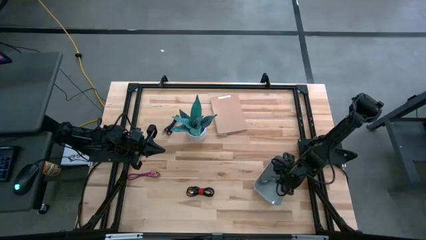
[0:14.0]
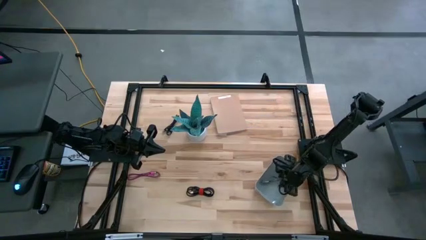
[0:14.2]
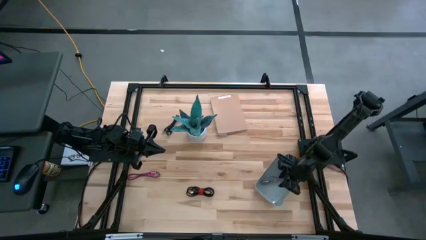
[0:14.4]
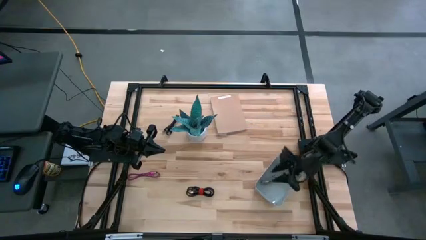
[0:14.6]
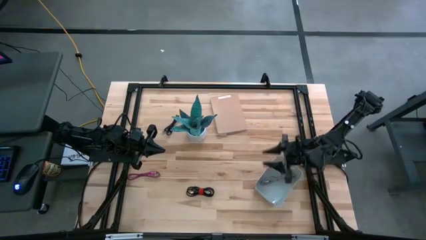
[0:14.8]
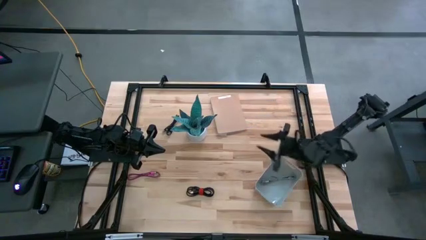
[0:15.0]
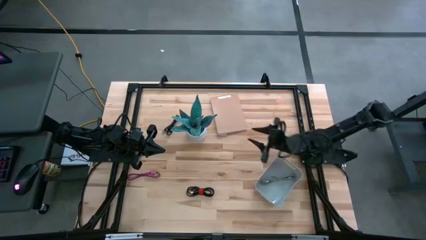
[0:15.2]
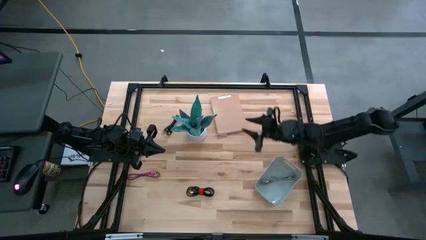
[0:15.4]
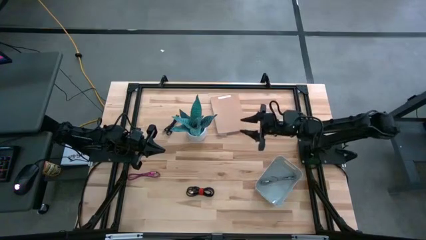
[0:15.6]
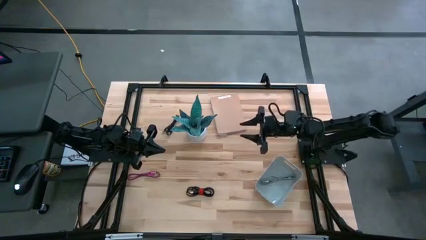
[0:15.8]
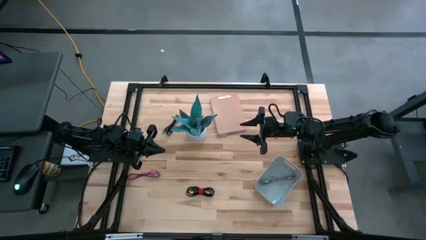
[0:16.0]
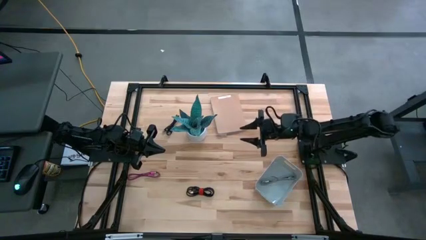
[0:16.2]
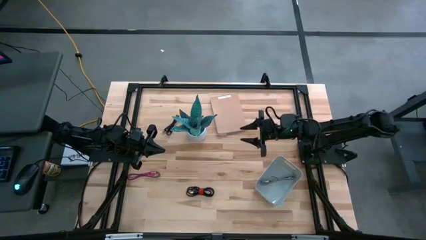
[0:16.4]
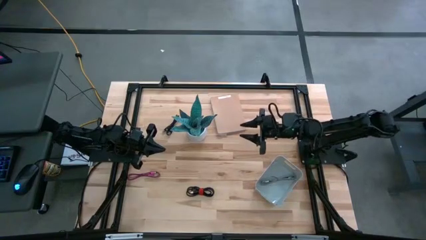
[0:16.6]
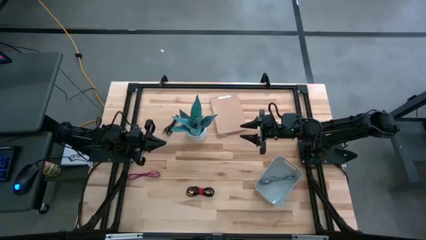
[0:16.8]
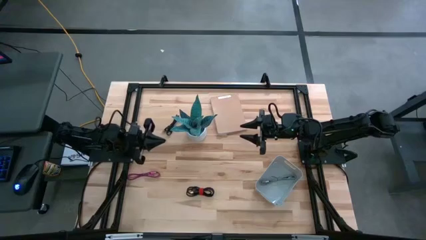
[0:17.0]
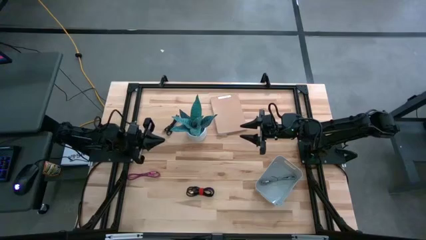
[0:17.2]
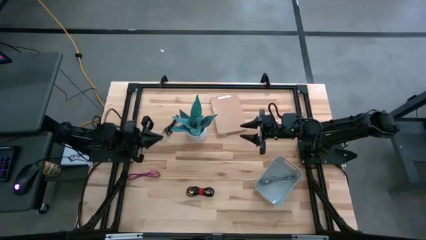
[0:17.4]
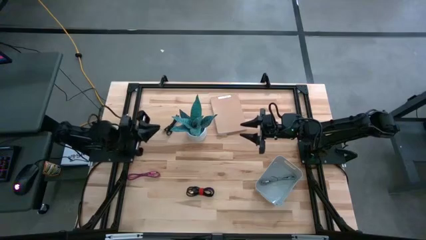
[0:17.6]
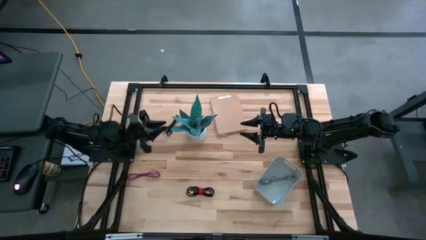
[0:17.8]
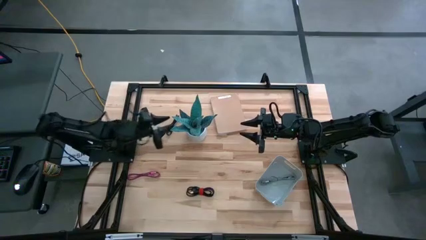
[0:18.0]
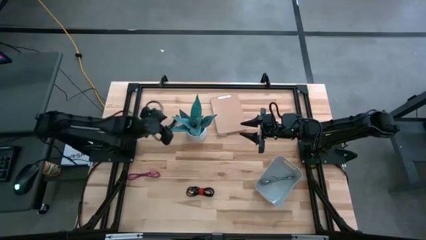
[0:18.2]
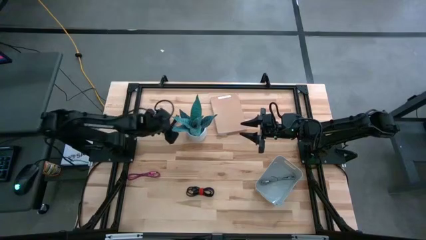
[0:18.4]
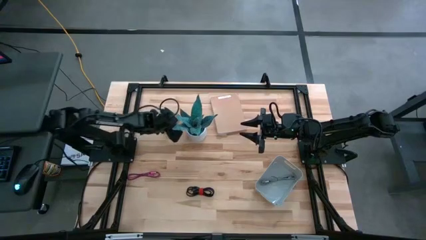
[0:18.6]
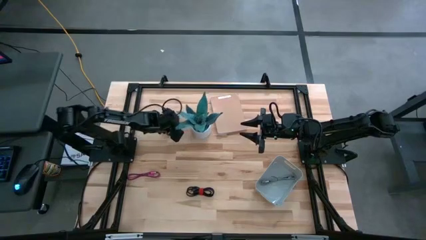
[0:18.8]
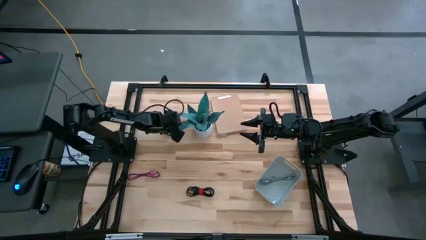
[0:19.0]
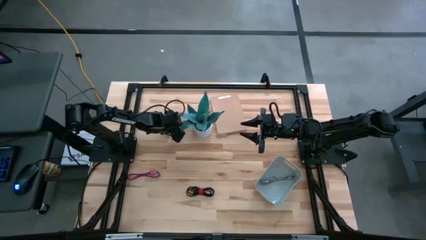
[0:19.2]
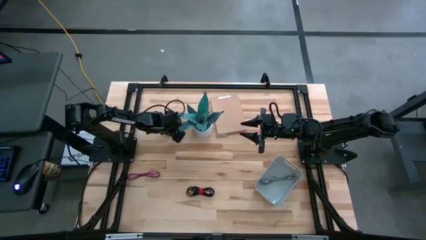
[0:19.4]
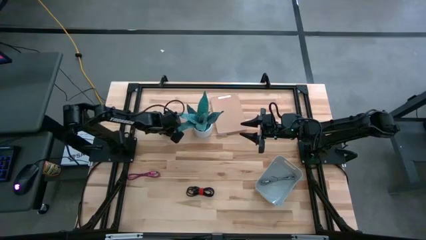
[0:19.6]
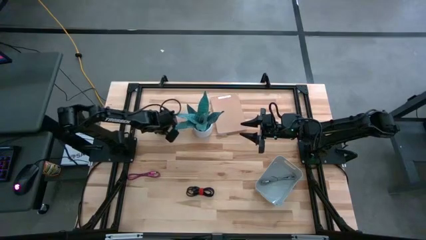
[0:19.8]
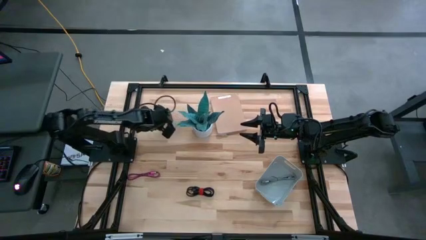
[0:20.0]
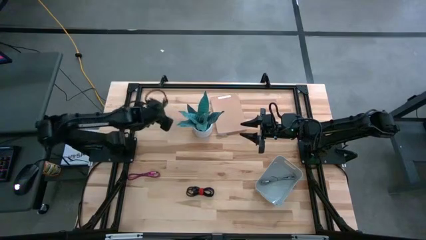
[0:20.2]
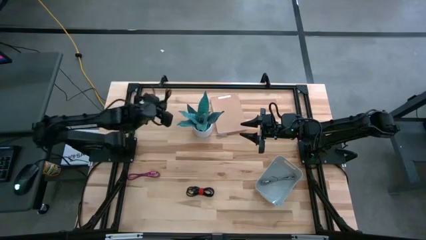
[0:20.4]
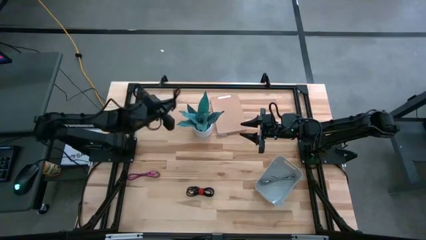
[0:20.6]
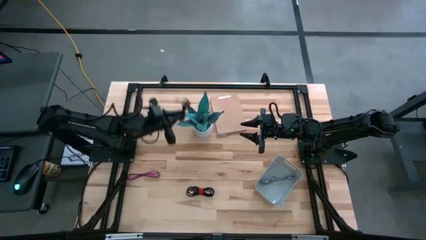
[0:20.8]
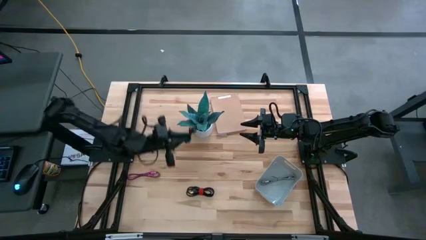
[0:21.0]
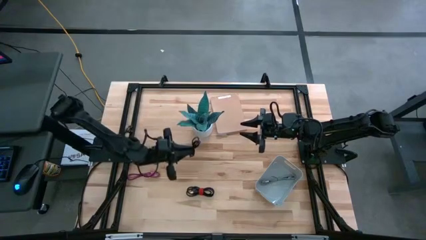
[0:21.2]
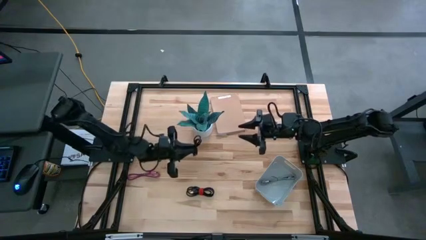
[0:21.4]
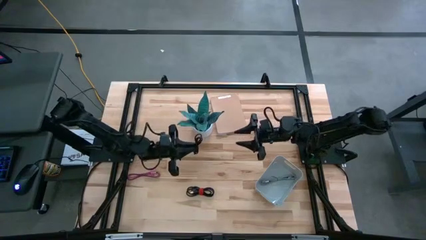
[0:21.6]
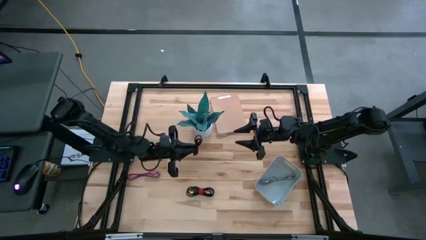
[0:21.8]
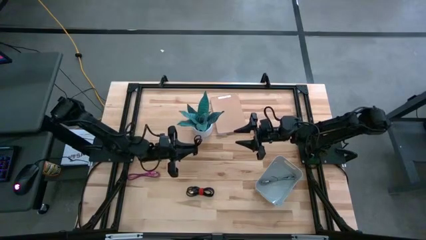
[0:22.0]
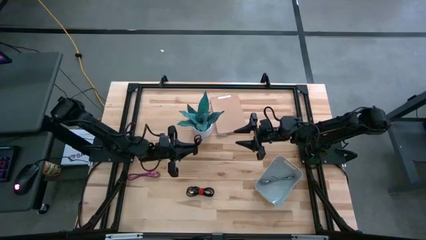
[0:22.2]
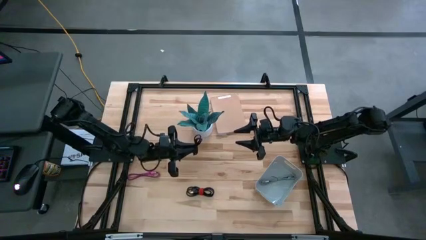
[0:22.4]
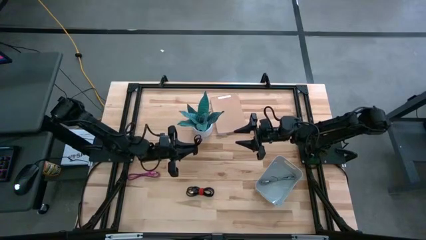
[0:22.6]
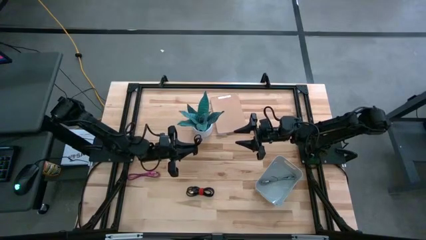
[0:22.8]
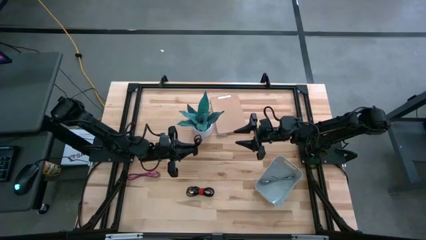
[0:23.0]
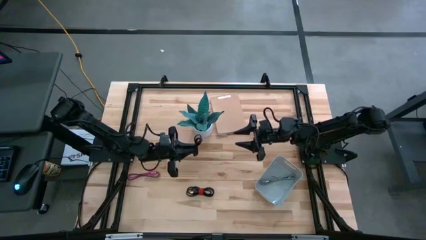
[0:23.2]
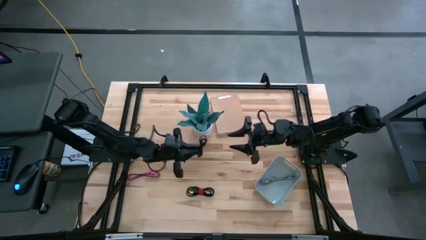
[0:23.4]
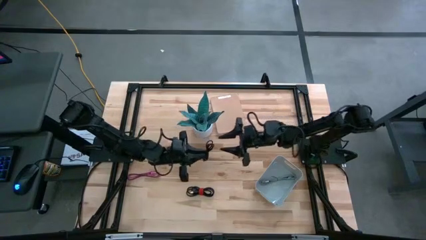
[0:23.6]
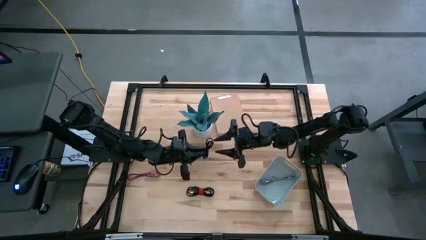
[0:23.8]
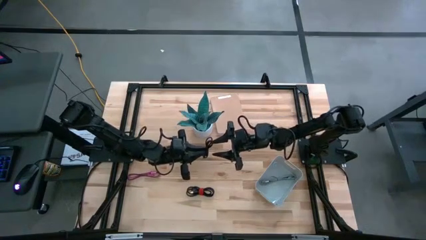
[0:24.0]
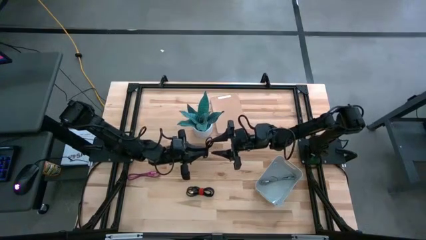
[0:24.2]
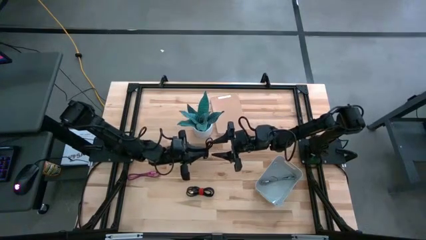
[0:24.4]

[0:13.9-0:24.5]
Task: Pick and place USB-C Cables
Put the top black charger cable into the white bin

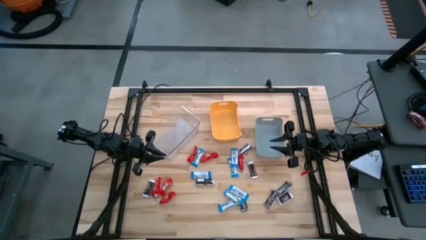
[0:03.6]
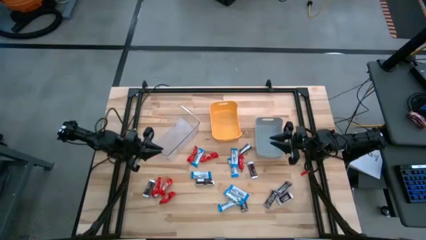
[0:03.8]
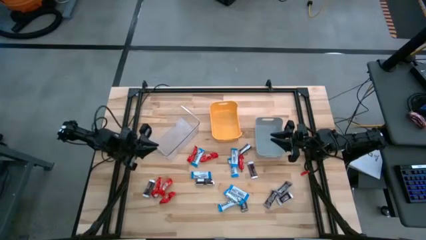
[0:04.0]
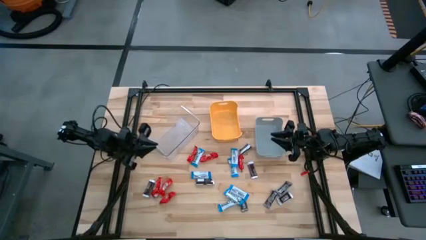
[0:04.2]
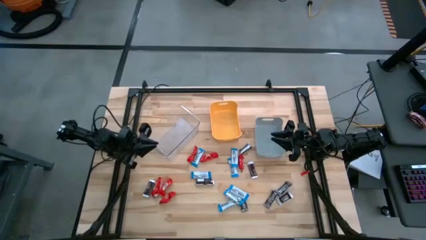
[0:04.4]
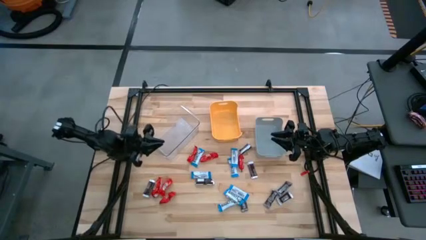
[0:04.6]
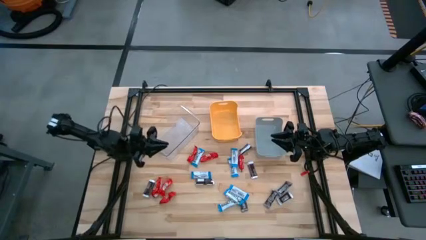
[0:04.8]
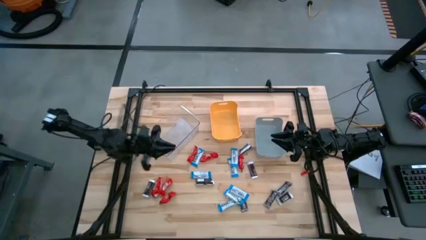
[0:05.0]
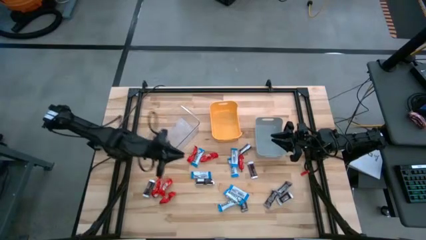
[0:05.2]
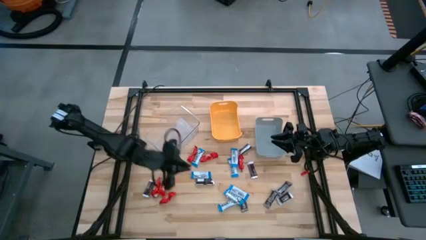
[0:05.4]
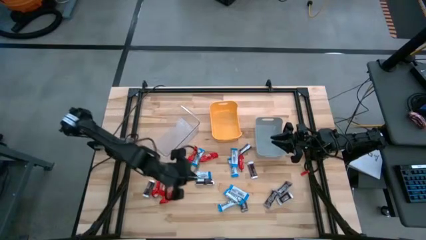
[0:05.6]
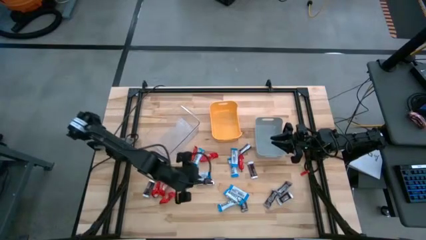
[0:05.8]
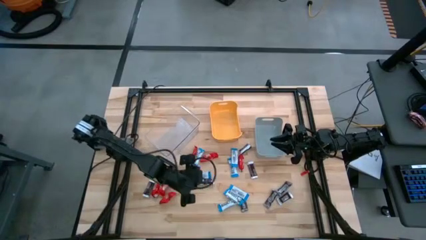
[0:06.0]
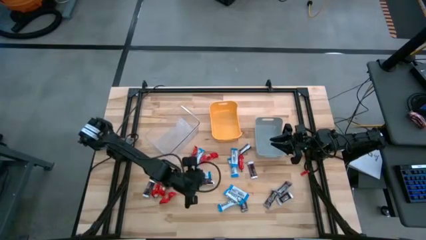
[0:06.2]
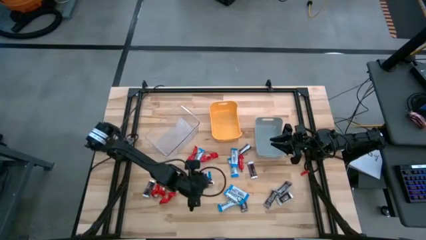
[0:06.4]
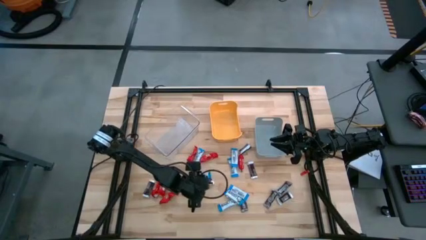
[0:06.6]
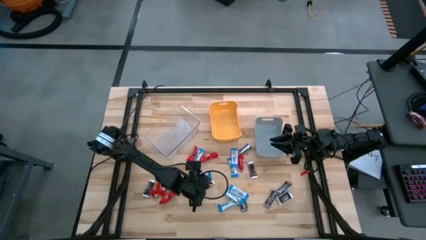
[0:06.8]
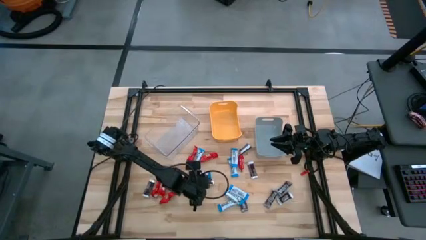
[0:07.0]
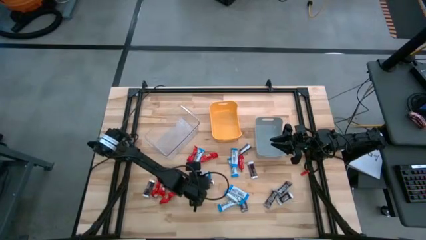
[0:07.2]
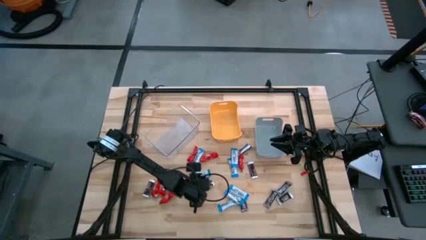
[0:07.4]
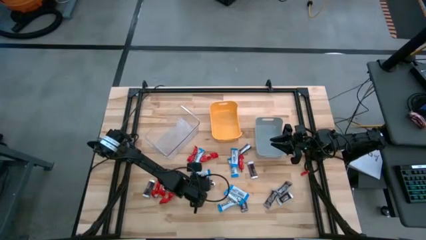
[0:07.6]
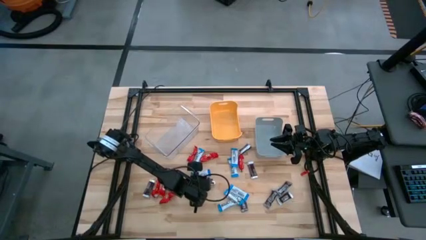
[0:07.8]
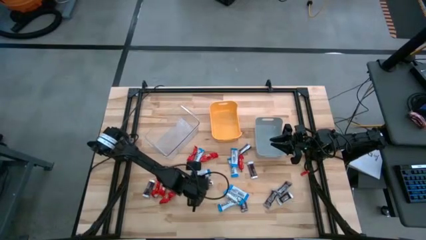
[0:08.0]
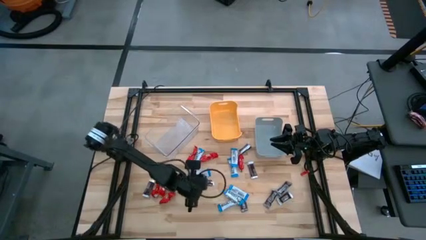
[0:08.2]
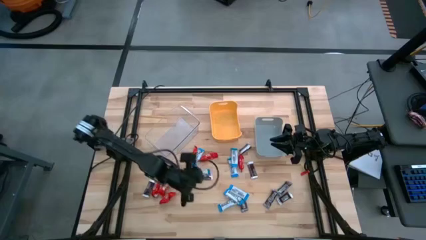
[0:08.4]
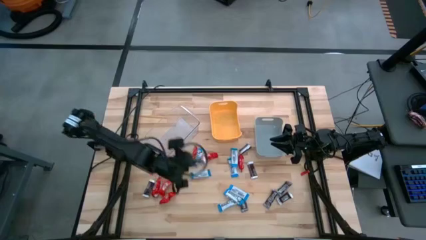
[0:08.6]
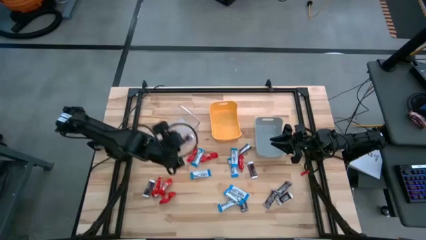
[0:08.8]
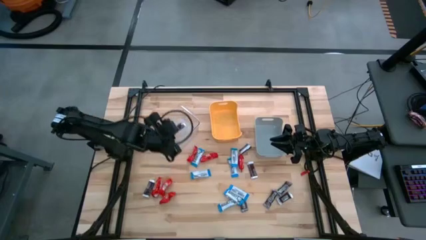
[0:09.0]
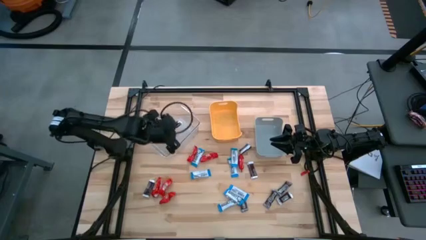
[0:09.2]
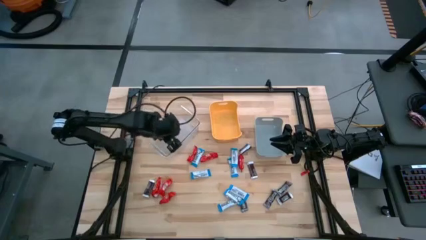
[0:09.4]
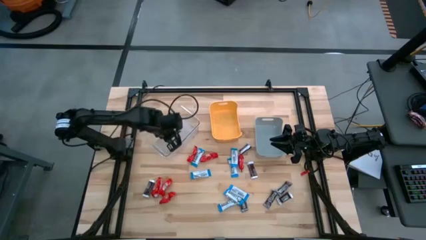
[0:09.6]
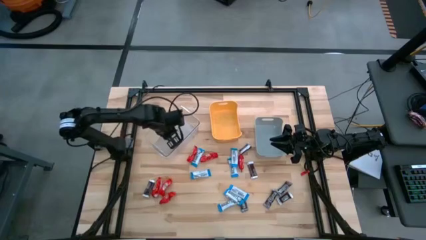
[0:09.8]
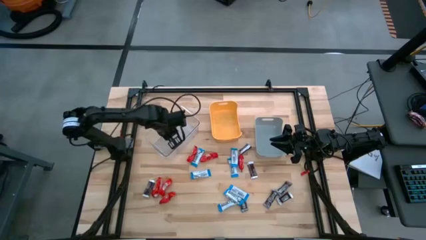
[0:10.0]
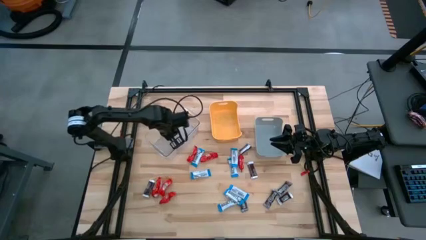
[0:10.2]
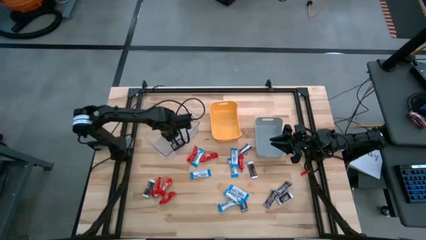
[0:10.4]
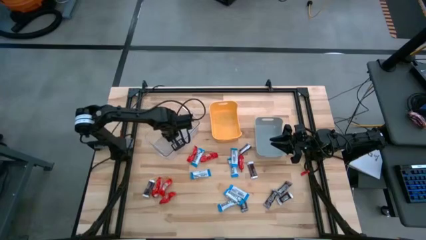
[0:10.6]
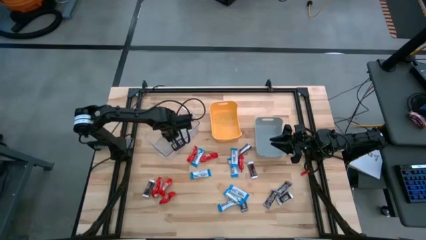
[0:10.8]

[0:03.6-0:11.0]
Task: Organize candy in baskets
Put the brown chocolate into the transparent bin
